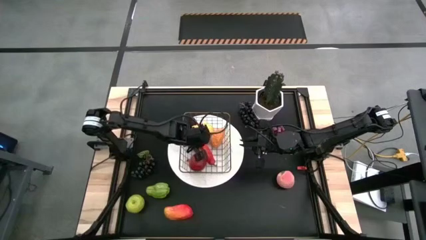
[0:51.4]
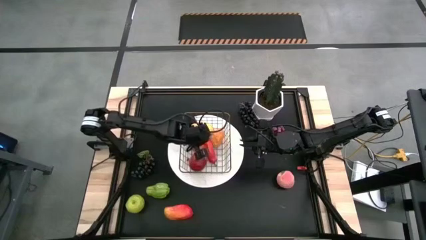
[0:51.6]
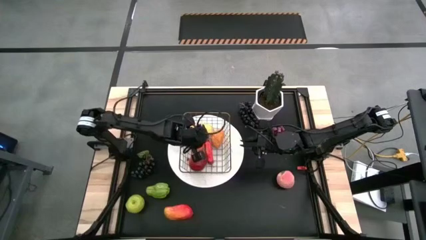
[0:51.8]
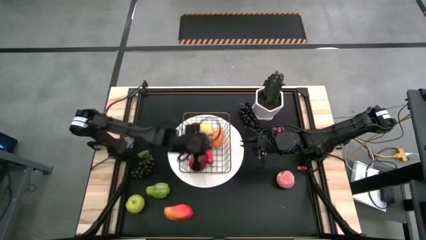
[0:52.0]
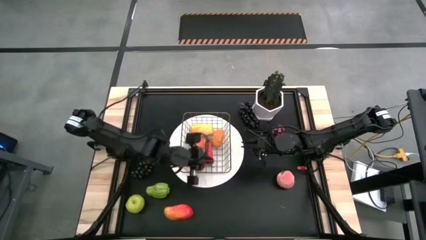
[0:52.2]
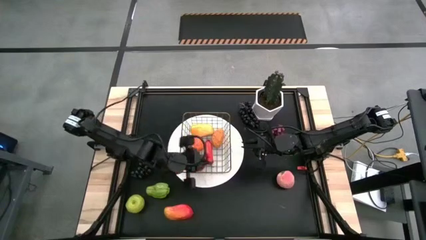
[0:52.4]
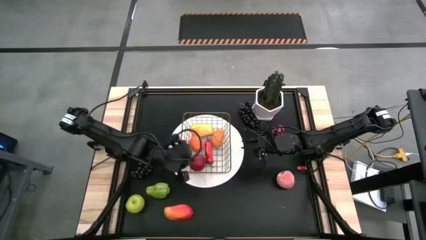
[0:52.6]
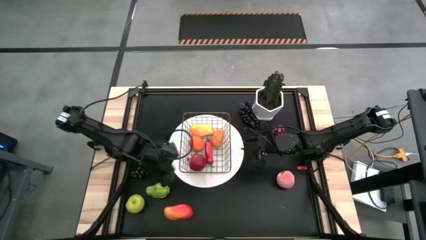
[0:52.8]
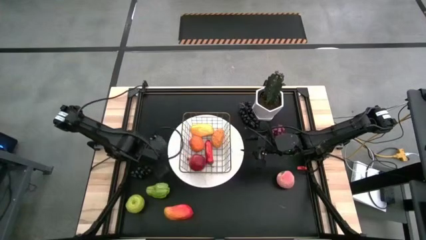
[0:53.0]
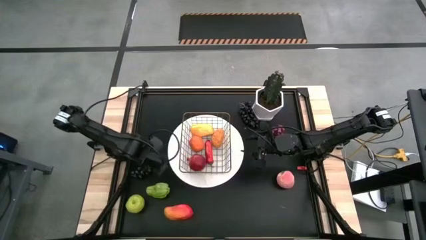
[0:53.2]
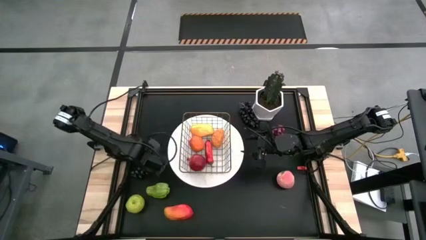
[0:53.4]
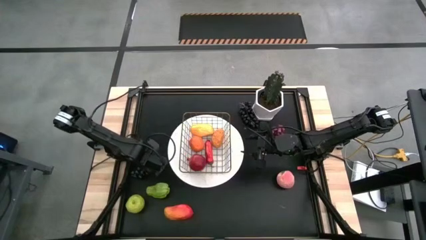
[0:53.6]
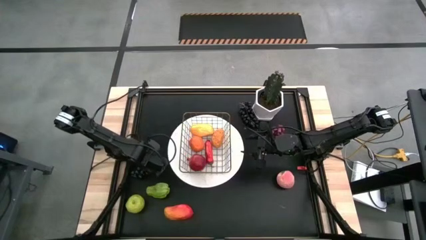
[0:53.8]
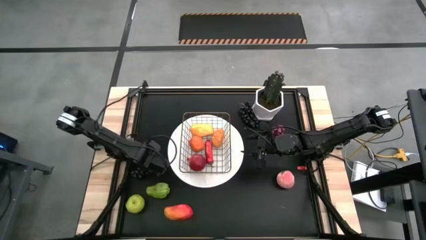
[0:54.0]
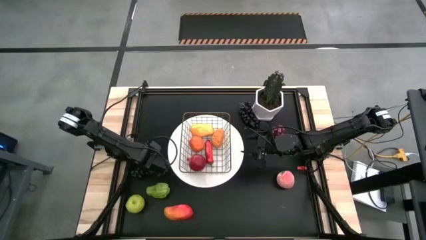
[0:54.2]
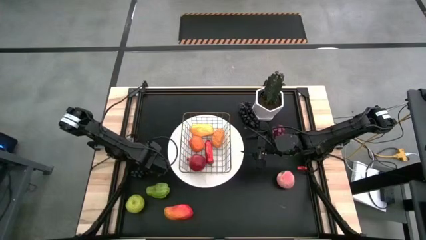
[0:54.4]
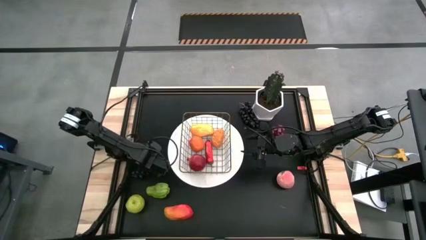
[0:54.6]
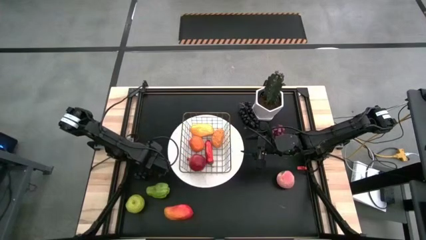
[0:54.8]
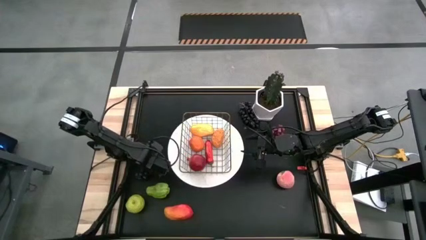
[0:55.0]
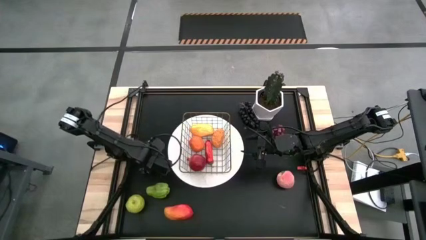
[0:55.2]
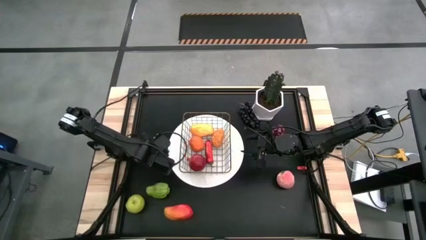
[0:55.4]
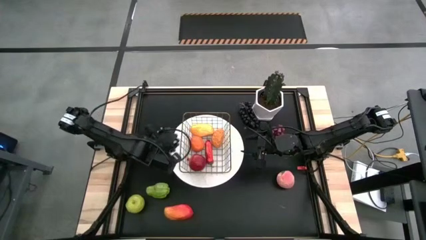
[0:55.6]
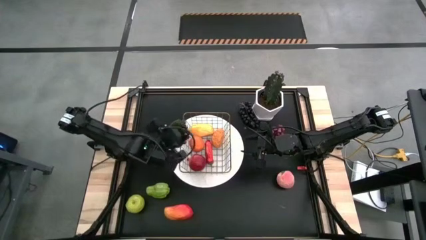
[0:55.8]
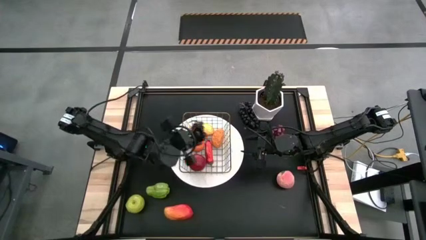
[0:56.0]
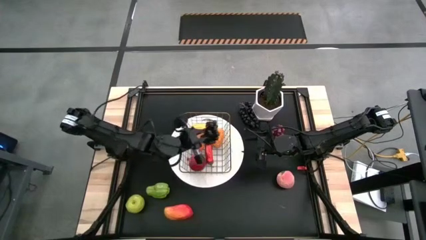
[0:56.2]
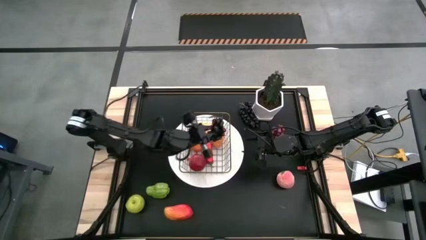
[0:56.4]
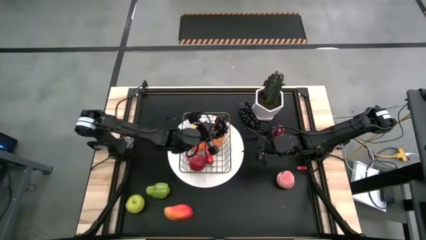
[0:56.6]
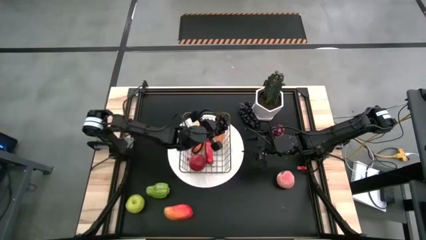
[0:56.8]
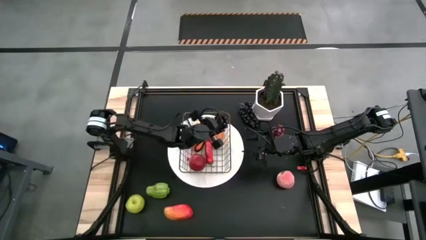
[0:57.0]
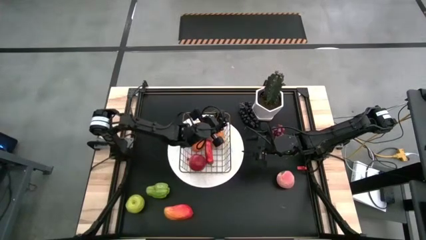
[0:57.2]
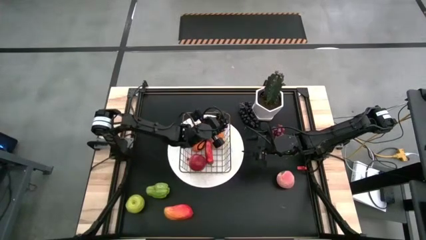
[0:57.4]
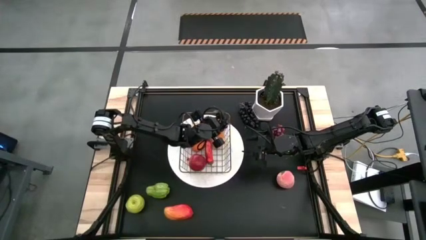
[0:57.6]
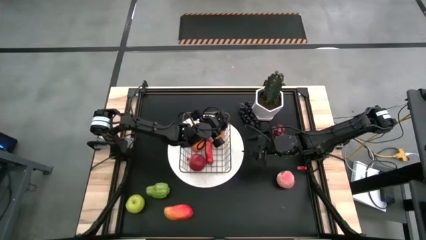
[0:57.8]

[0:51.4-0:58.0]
Task: Build produce basket
Put the left black grapes into the wire basket

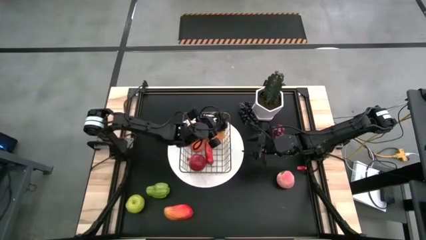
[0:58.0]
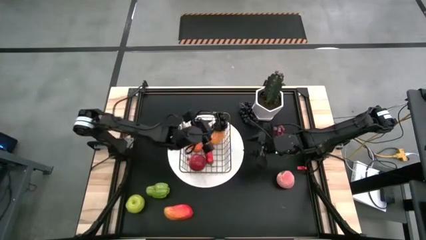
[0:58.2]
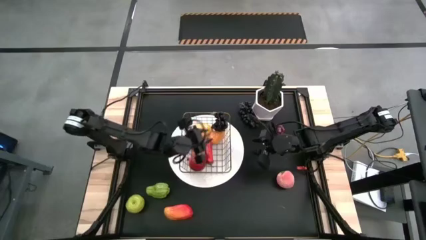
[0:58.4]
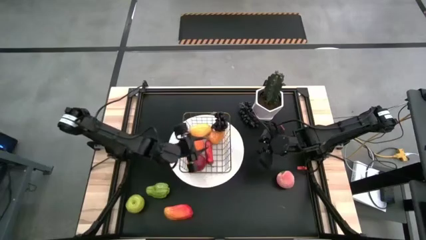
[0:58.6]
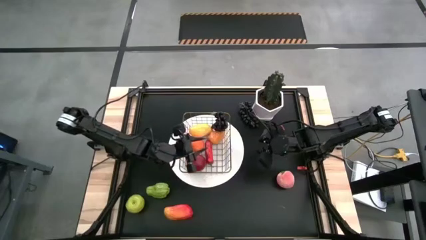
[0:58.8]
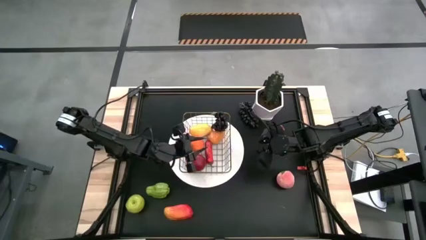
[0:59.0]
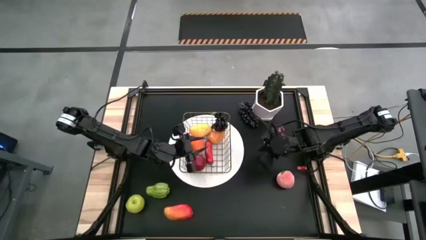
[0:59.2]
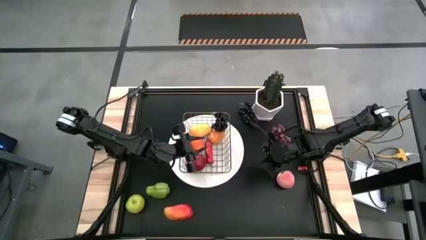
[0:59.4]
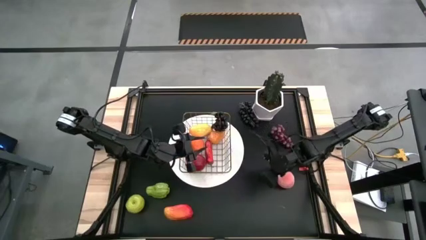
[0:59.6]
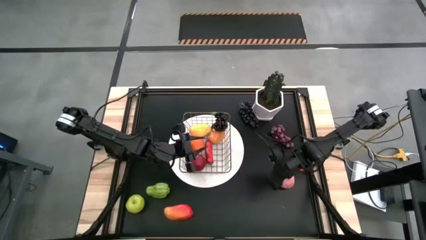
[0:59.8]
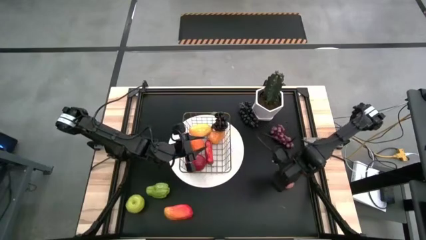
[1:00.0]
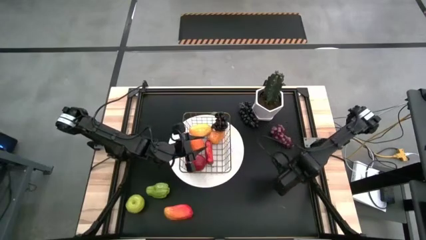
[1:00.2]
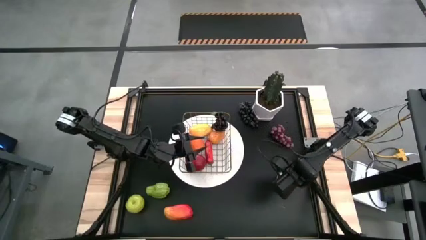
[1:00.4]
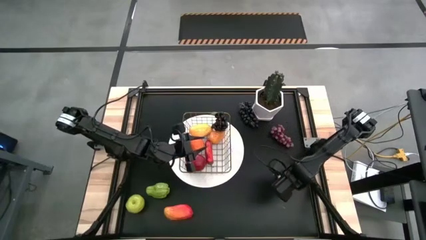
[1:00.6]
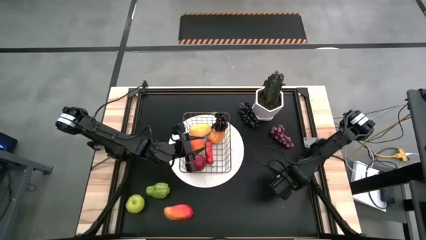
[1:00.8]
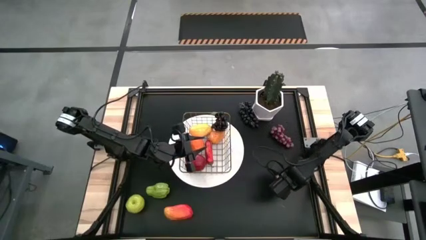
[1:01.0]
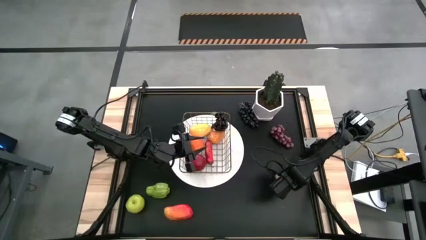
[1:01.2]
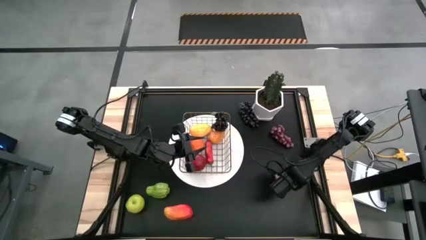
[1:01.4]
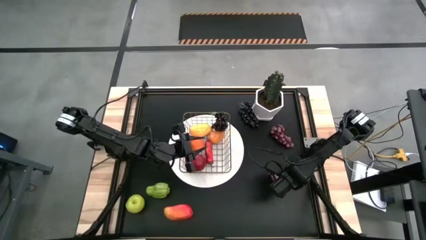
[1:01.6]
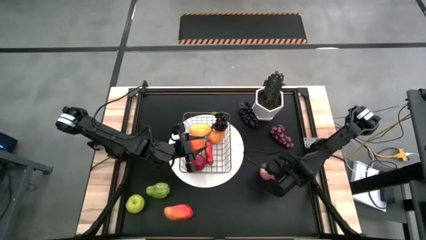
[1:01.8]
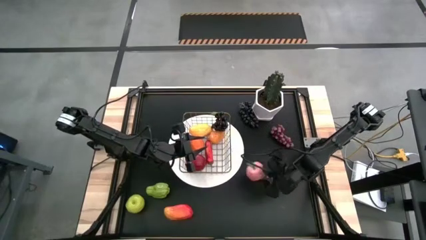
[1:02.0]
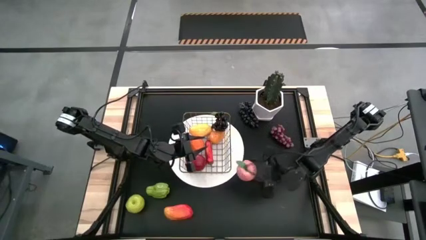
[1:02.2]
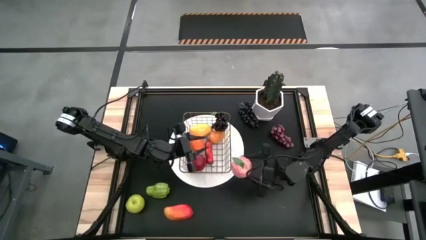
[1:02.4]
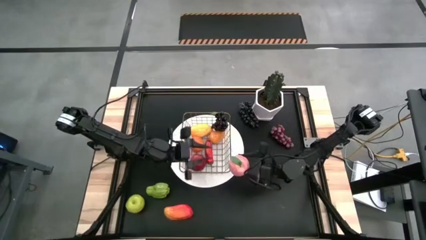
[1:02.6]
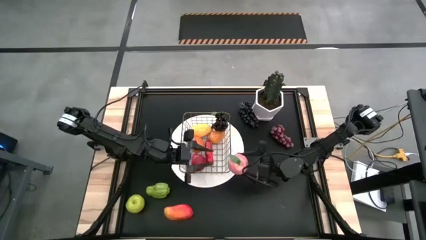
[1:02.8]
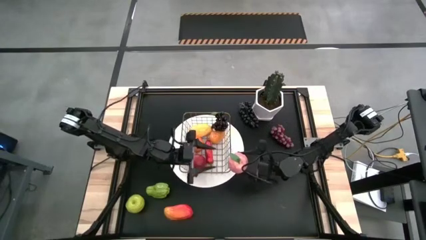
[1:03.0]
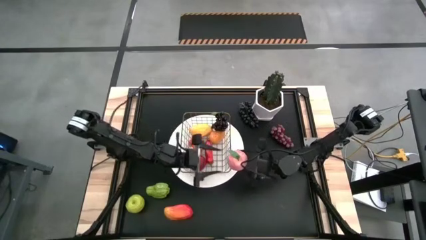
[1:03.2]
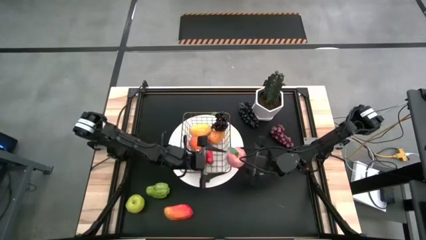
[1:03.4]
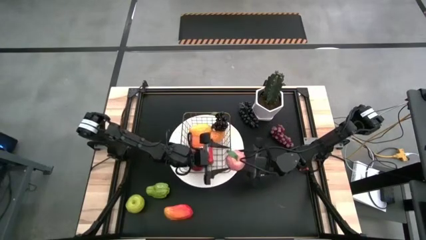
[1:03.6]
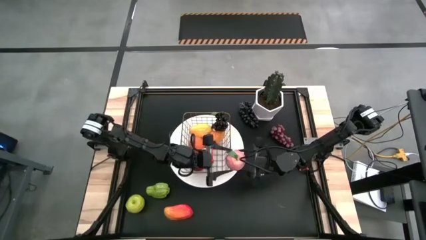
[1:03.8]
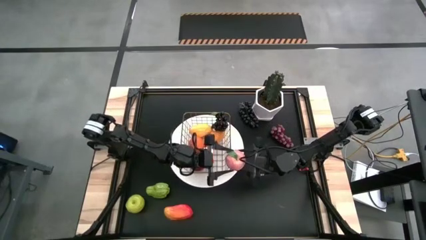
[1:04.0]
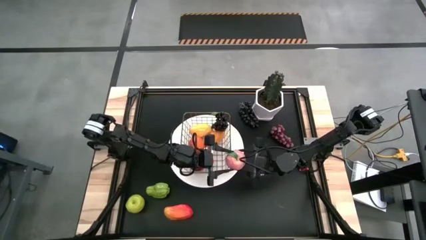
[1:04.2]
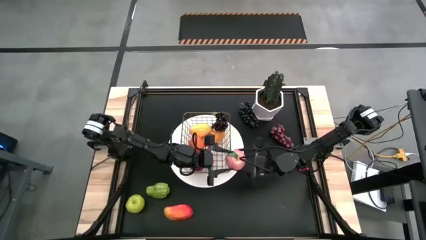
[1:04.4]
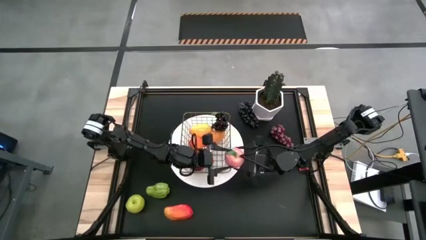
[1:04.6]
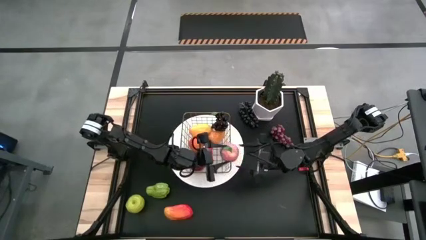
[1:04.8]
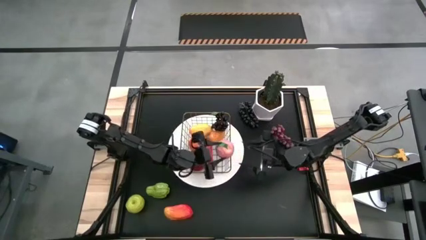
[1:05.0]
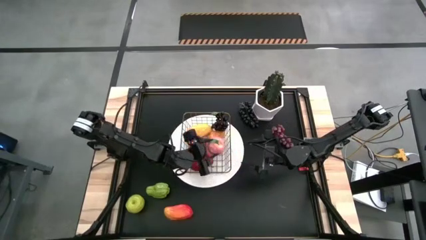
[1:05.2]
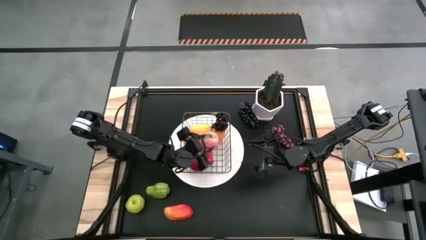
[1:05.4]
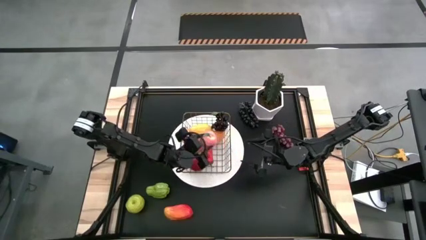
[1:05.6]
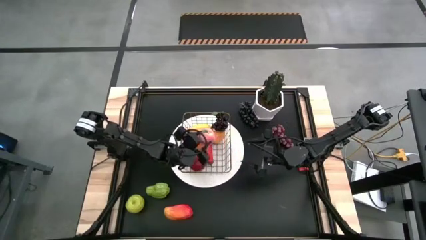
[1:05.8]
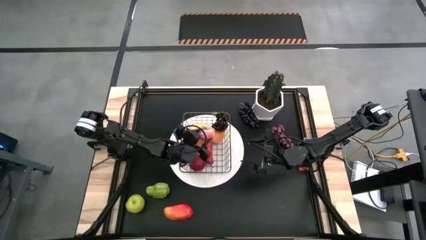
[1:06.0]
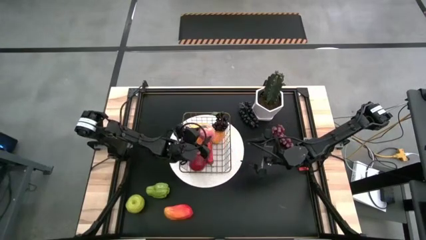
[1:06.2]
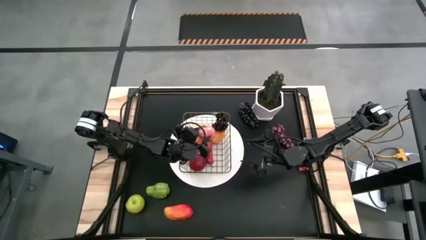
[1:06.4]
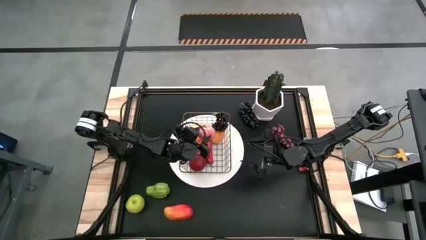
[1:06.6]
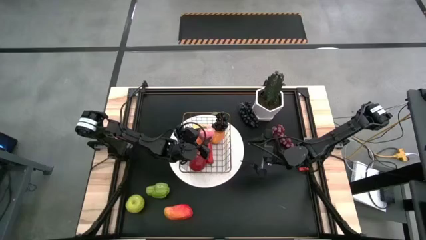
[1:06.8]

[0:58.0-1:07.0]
Put the peach into the wire basket
